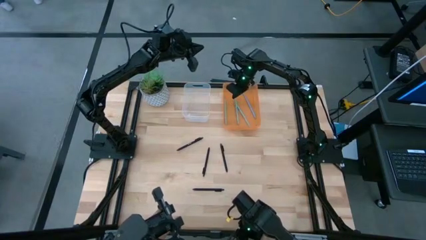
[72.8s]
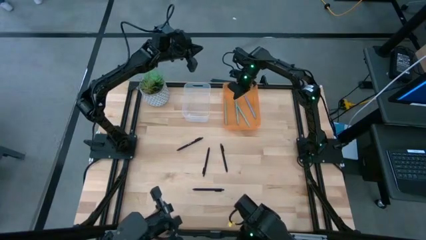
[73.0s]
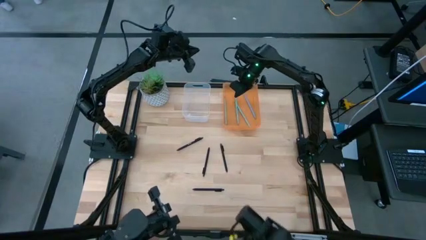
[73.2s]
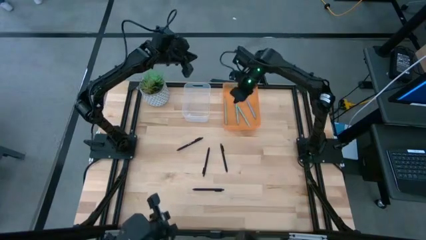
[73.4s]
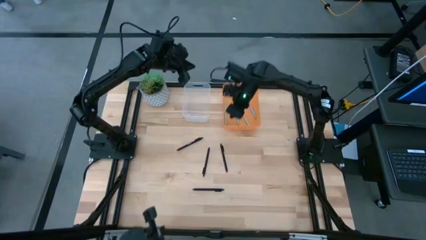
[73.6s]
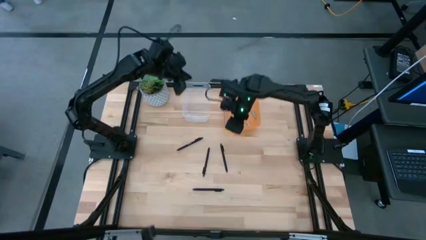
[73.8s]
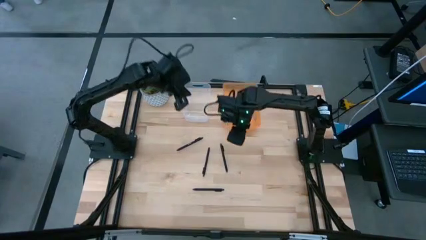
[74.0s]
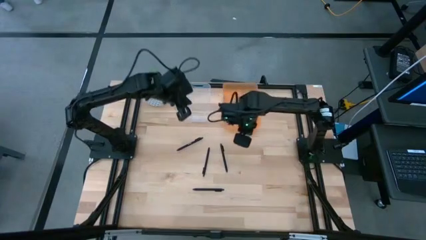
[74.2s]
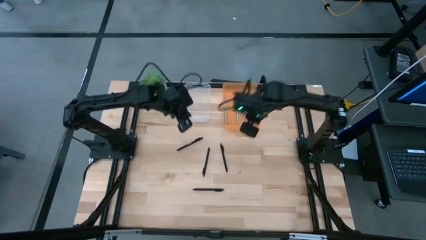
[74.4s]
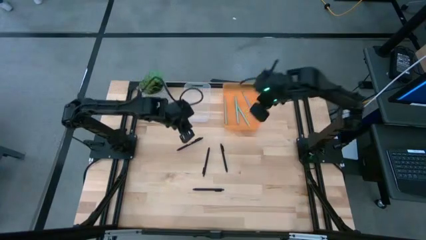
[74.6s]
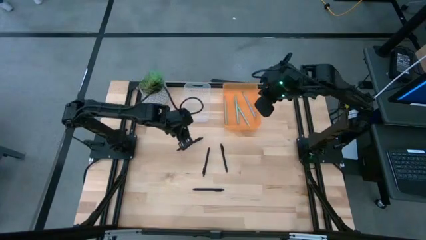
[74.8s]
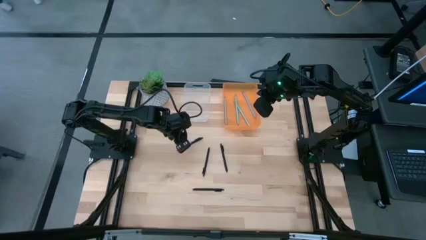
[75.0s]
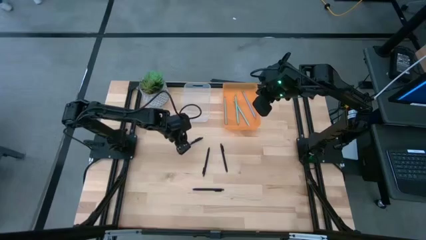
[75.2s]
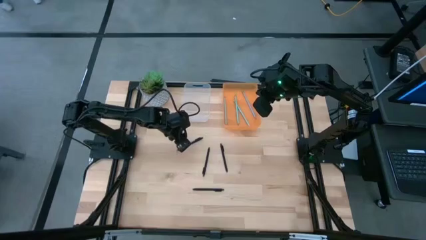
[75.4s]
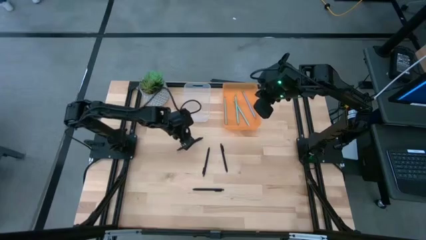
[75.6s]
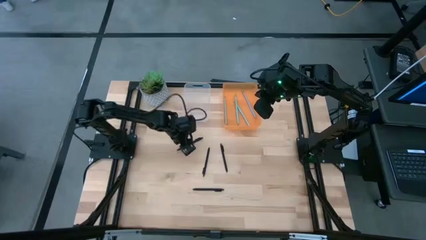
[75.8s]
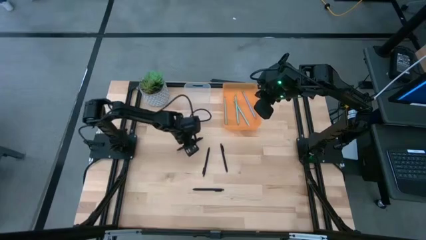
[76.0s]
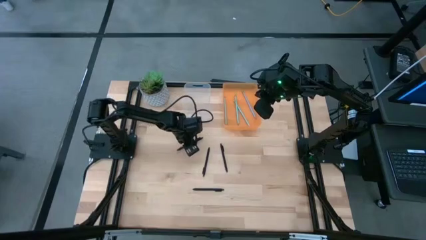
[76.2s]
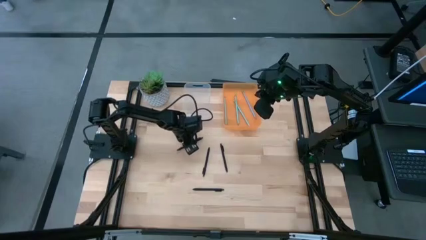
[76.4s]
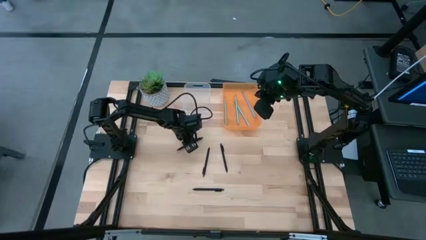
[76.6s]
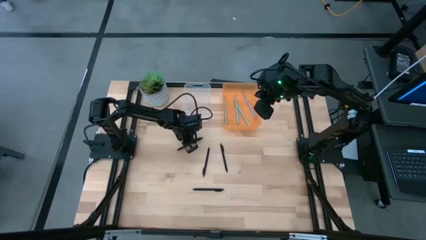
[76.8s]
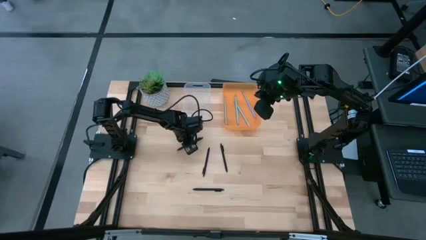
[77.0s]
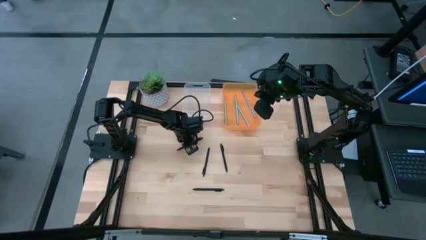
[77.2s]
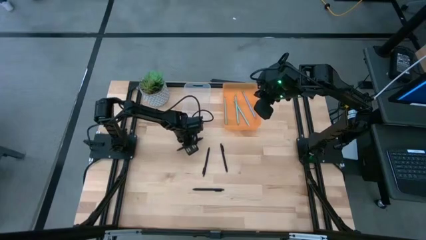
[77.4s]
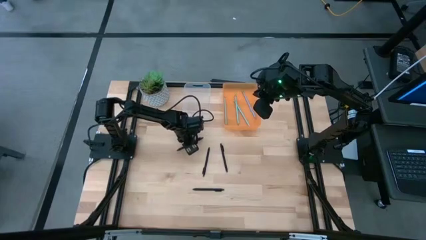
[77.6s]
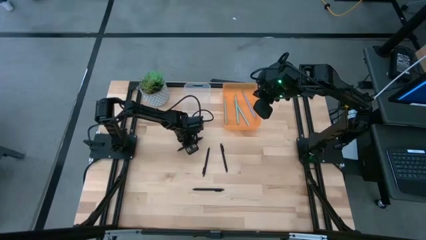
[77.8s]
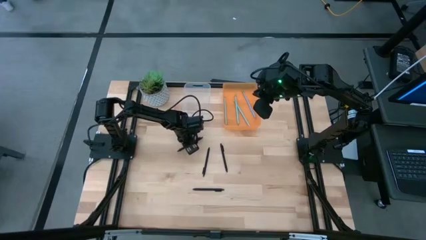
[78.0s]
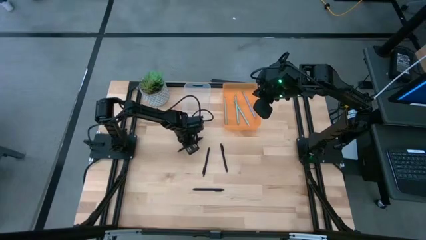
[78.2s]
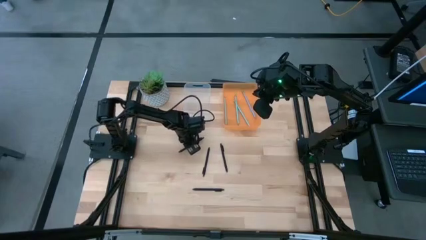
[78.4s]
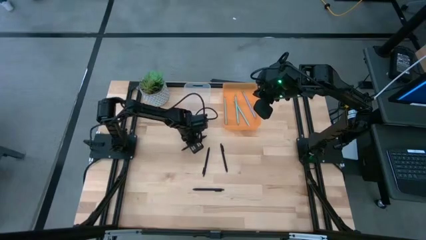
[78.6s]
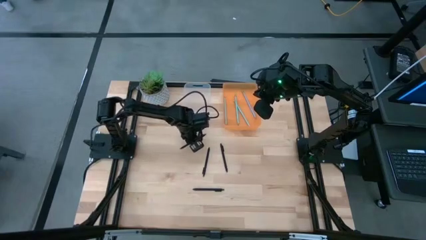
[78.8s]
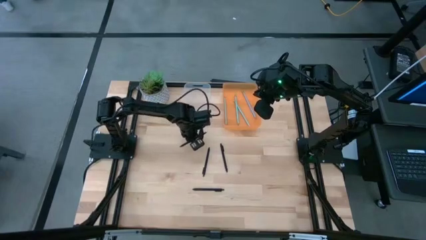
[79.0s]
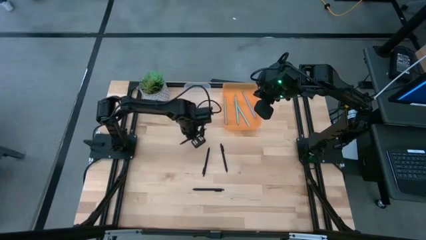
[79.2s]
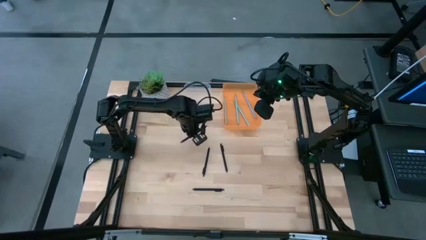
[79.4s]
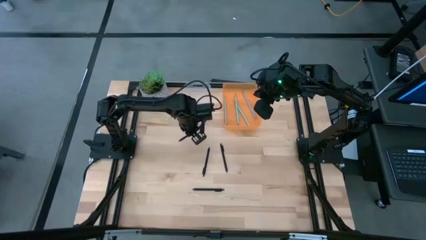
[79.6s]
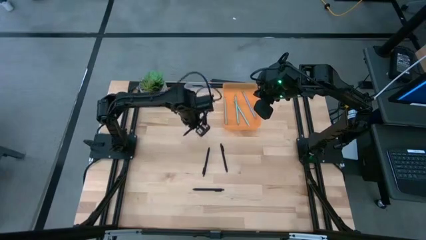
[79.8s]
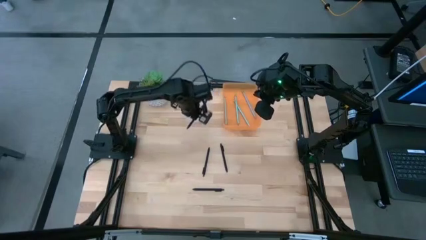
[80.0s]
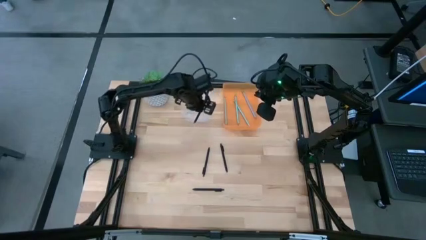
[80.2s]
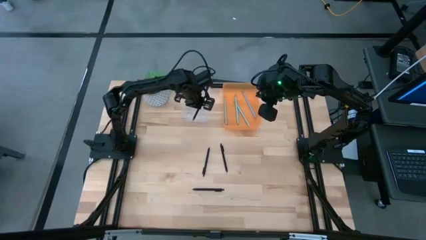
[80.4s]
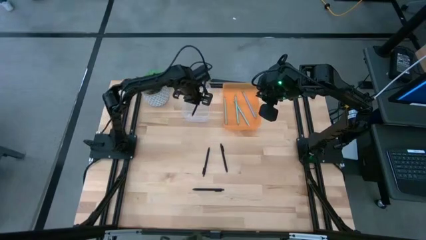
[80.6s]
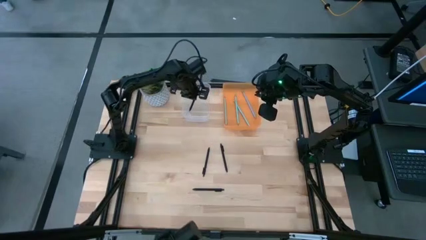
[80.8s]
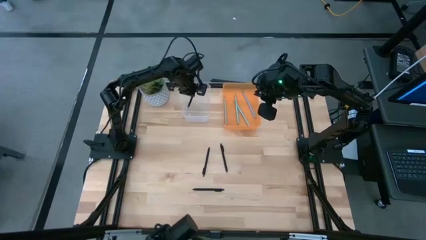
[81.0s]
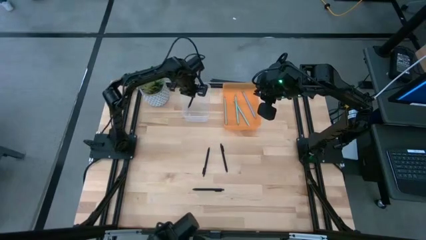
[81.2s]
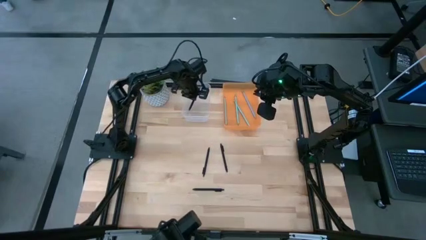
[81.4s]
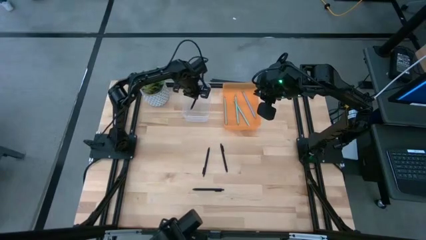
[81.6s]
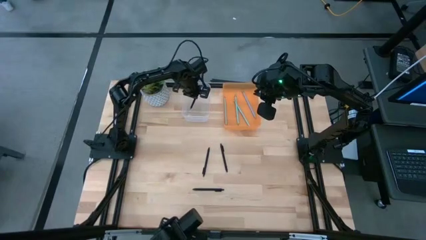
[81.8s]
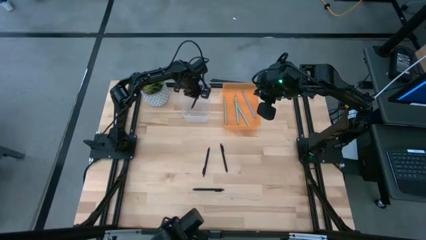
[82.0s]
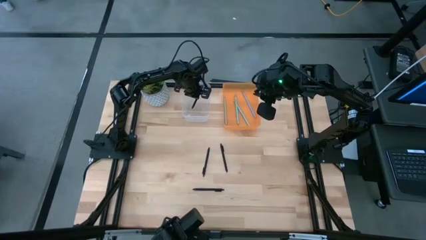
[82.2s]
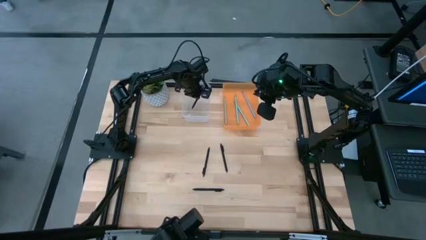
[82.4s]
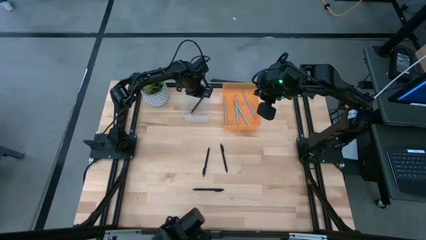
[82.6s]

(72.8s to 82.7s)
Task: Sort pens & pencils
Put the black pen into the transparent bin

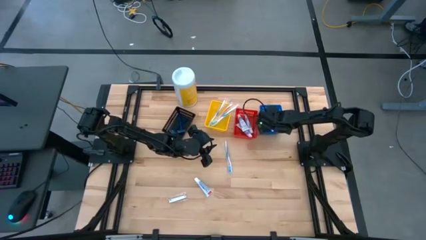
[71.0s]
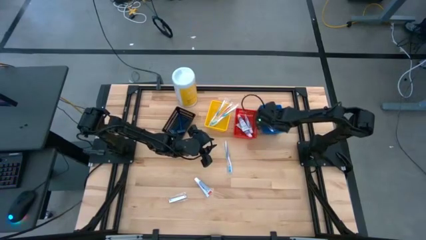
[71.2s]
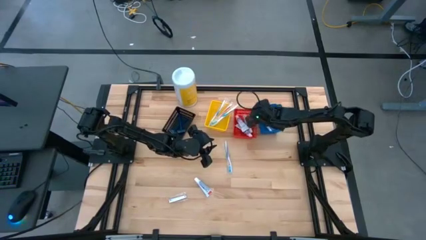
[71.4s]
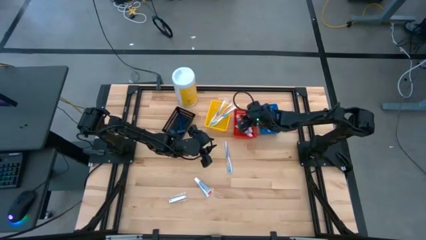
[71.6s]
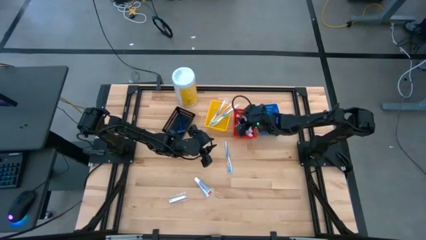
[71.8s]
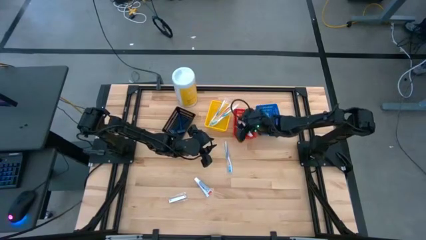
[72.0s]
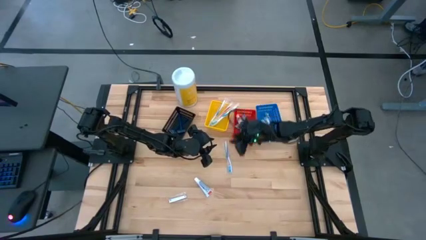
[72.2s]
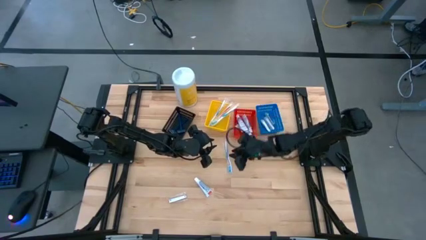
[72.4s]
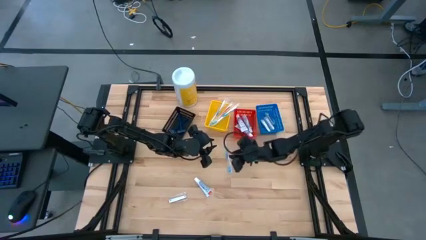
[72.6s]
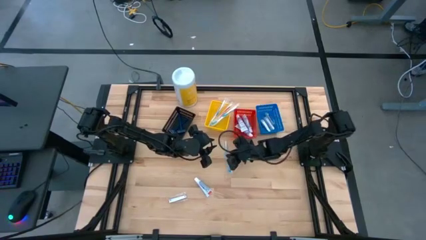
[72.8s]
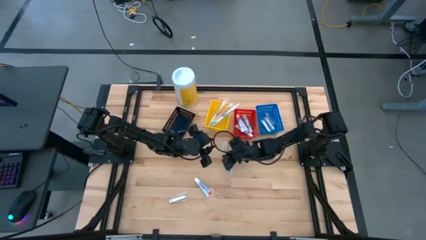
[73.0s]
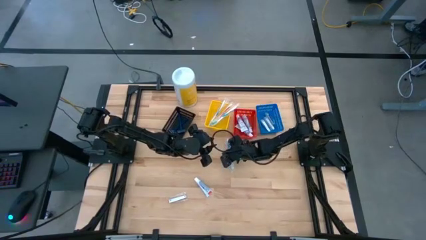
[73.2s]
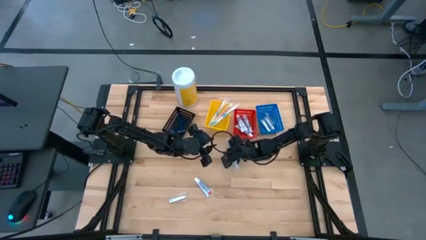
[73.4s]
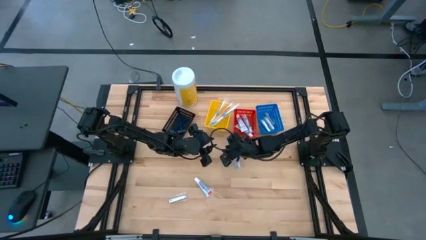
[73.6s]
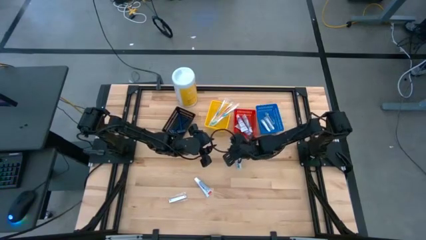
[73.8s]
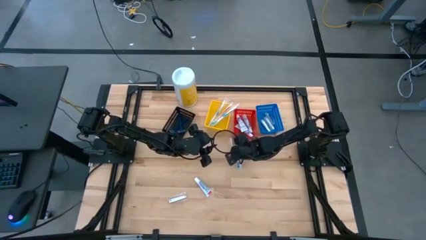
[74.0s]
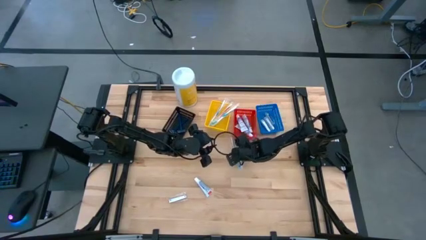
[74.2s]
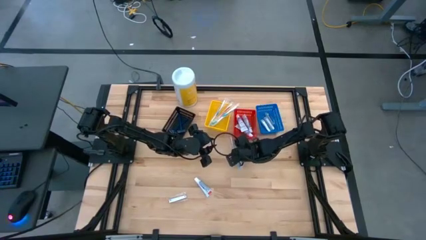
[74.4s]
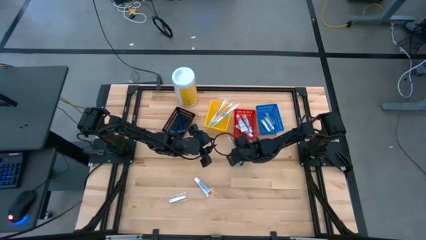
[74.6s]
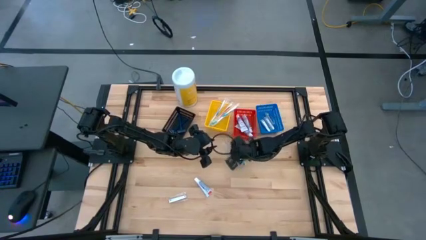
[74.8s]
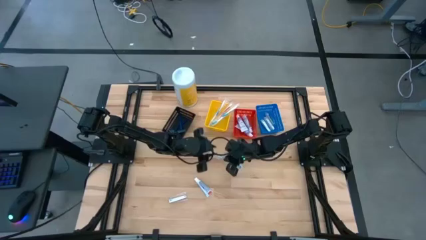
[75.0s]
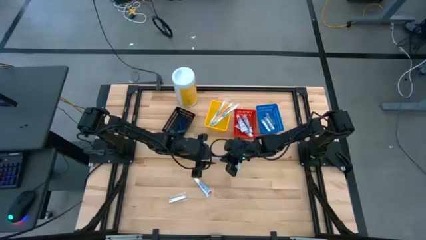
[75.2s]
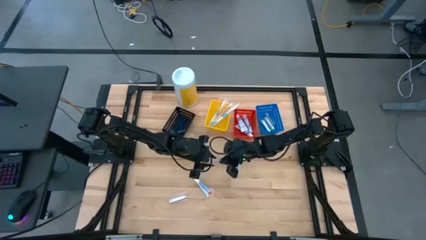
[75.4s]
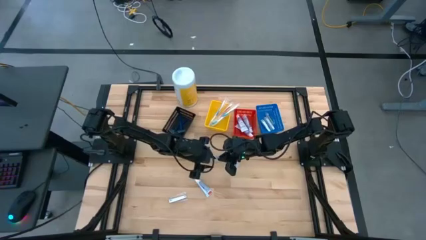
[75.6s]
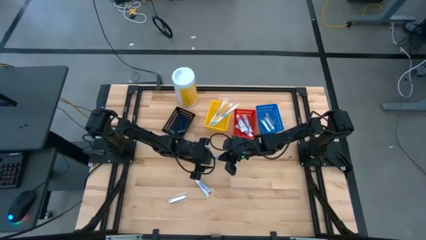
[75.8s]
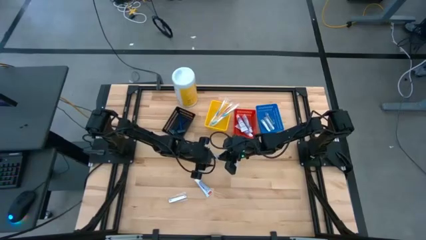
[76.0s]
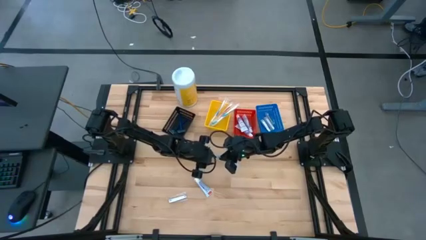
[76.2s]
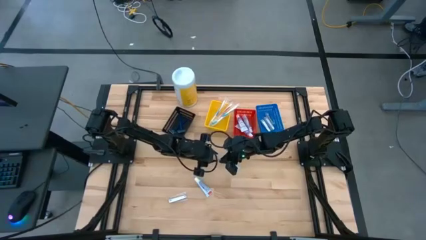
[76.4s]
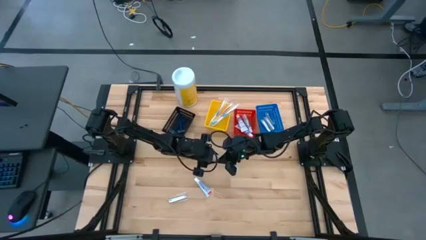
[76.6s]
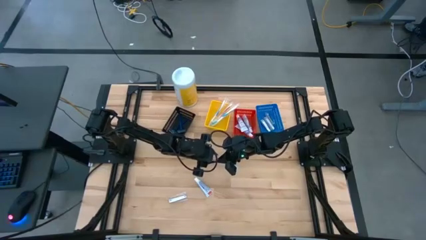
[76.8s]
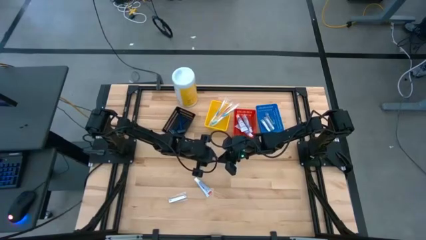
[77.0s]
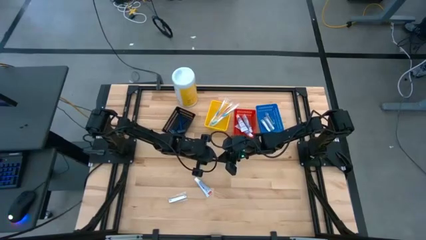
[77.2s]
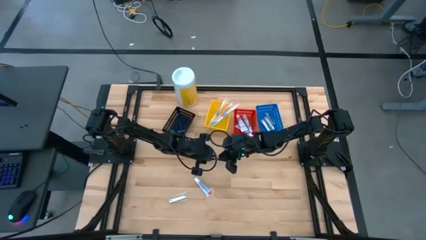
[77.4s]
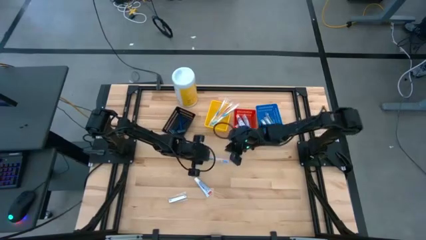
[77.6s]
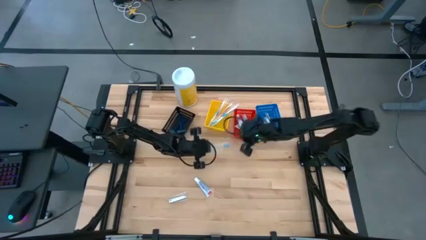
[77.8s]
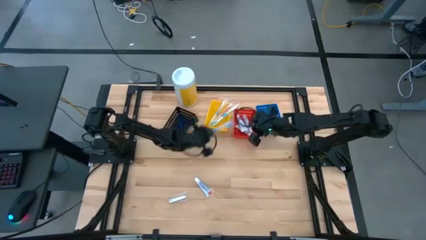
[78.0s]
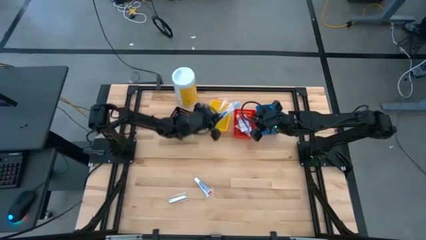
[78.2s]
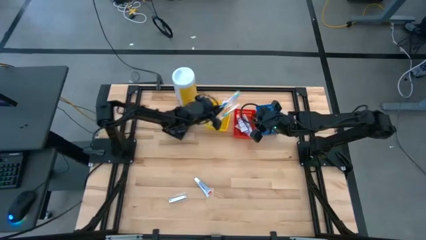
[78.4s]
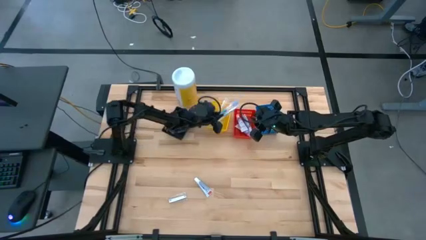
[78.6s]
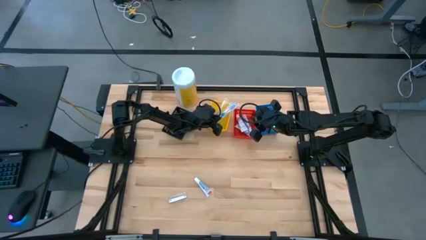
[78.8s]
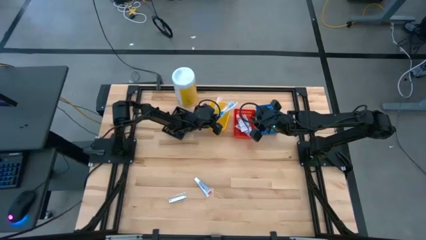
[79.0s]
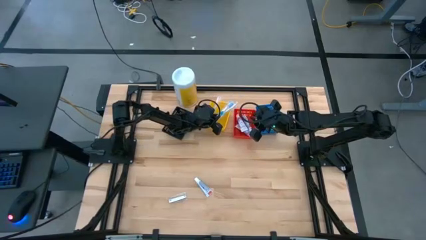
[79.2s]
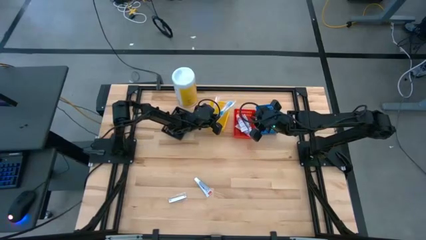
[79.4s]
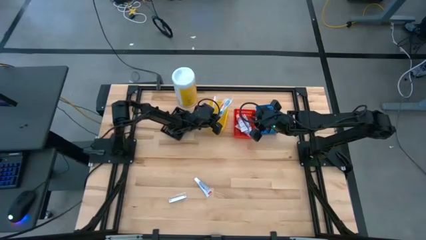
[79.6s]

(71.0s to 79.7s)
Task: Pick & Place Travel size toiletries
Put the blue toothbrush into the yellow bin
